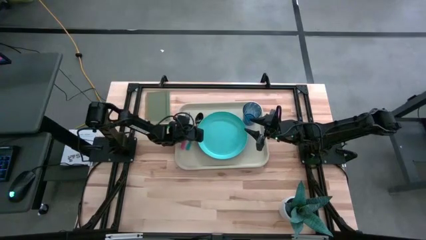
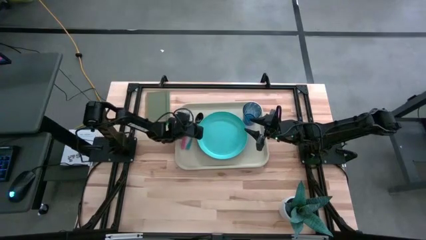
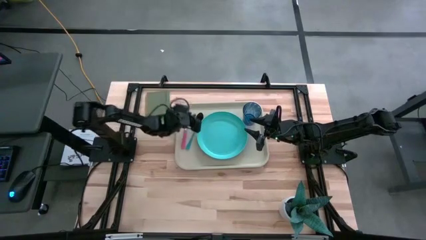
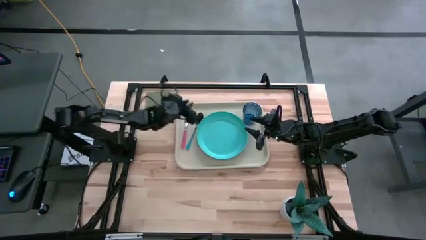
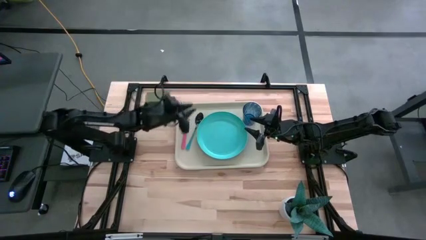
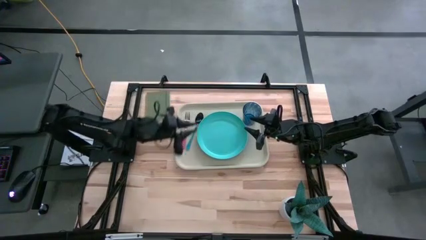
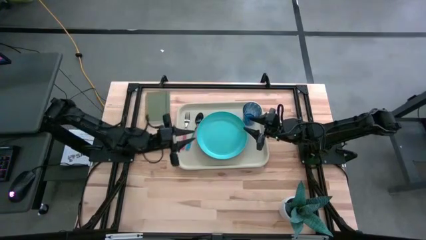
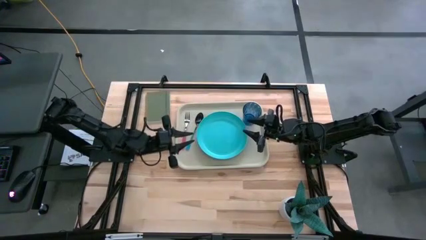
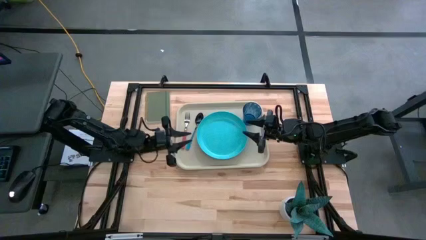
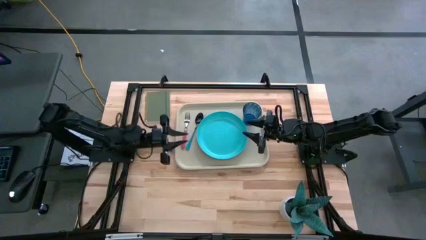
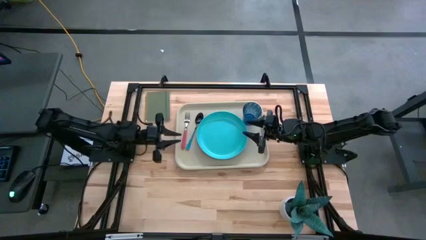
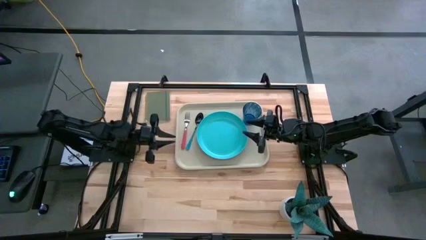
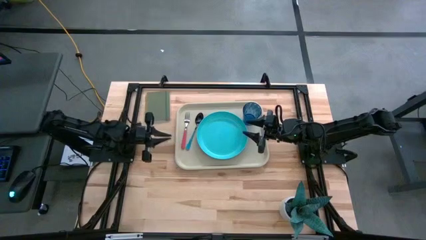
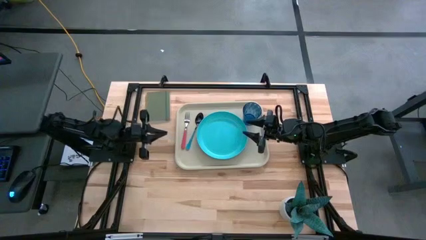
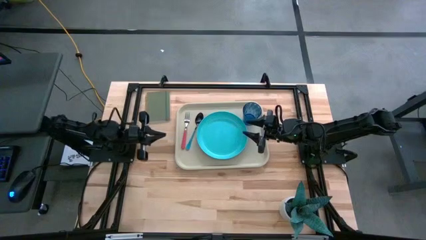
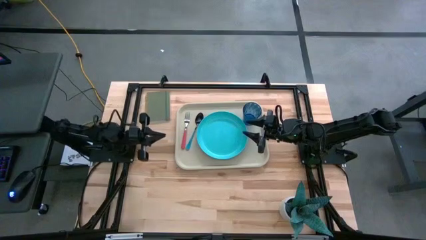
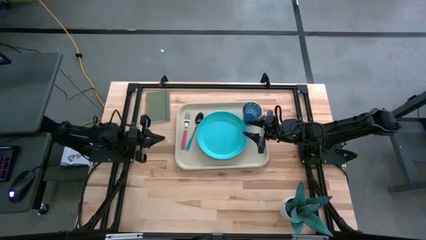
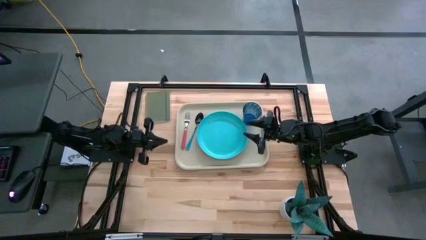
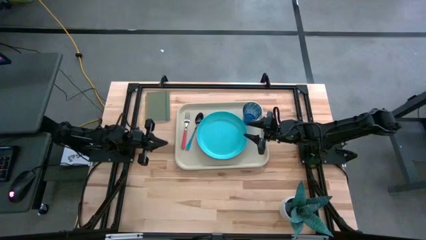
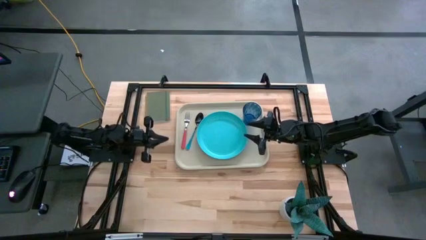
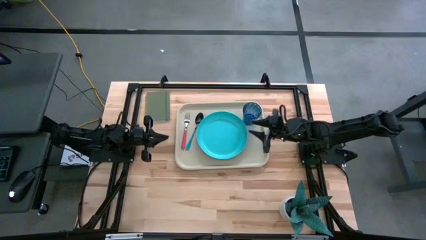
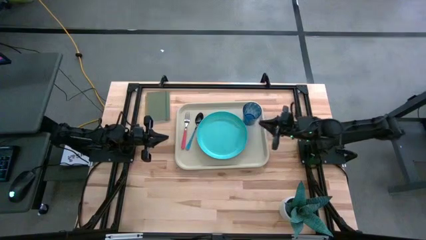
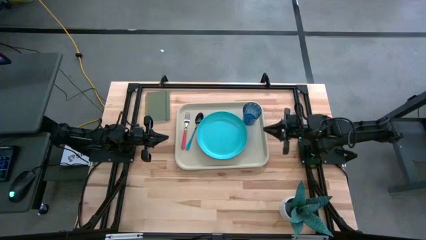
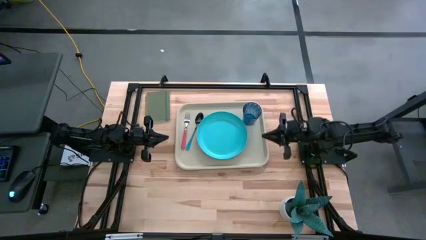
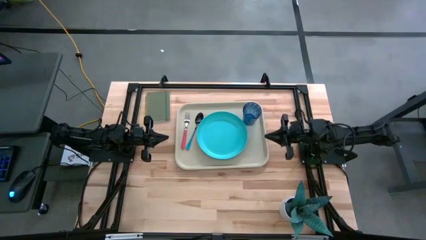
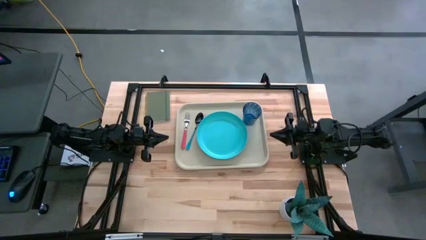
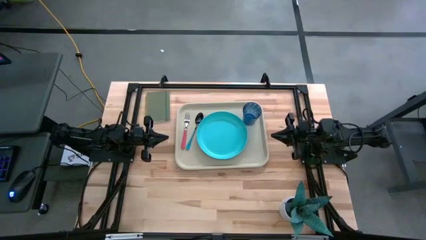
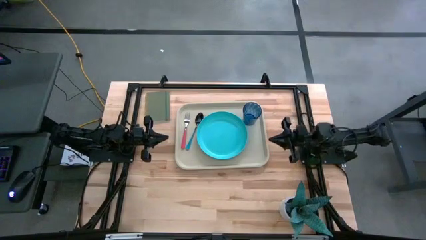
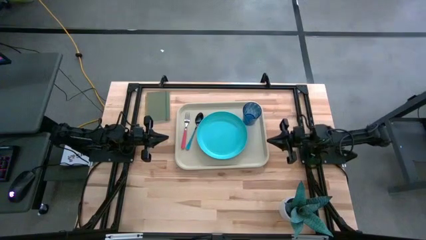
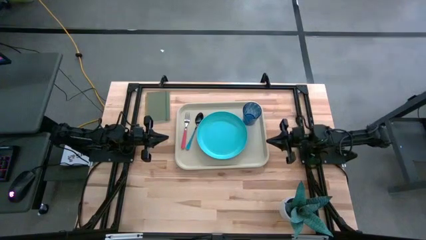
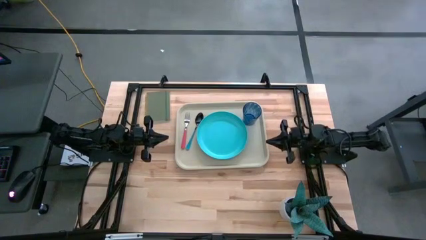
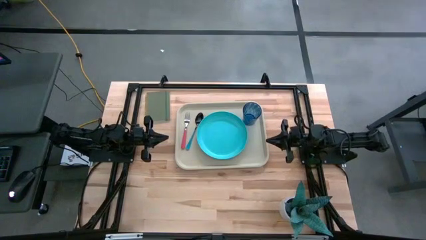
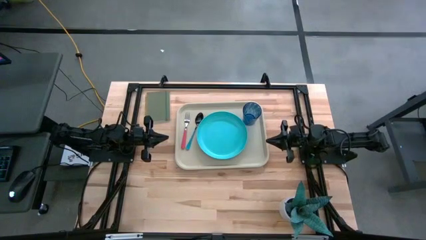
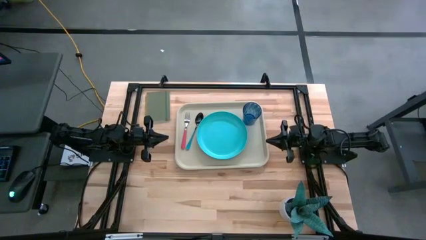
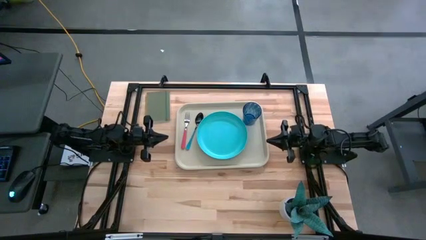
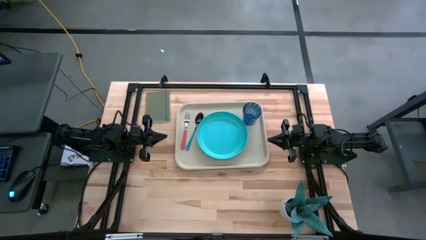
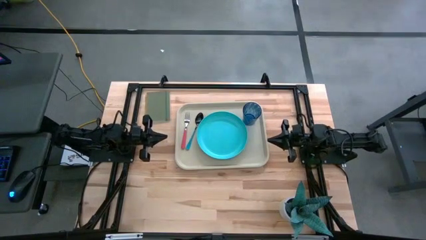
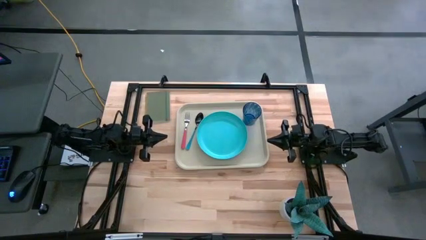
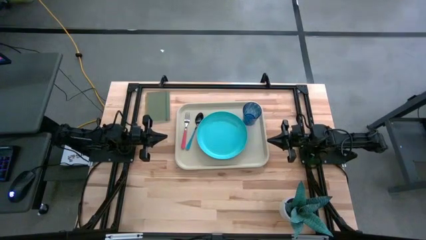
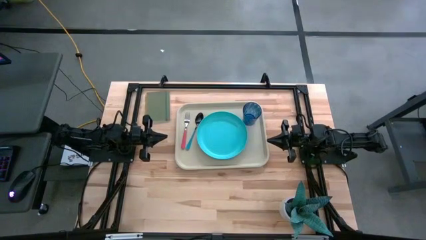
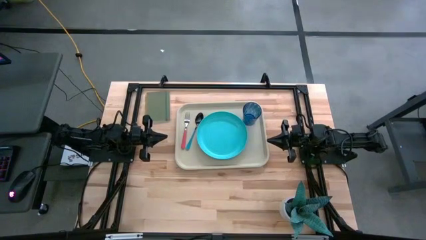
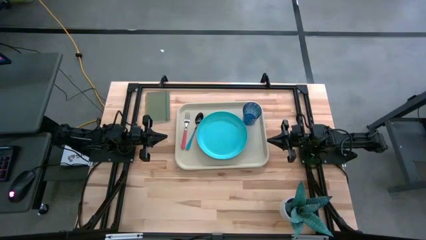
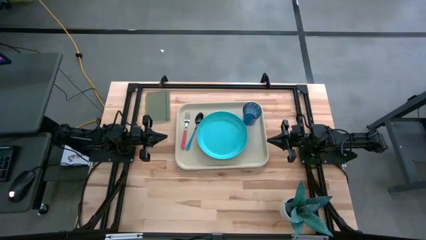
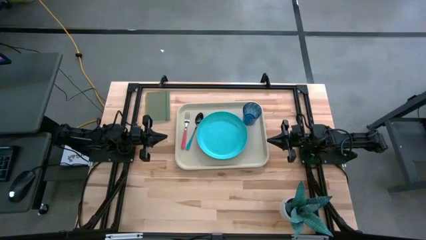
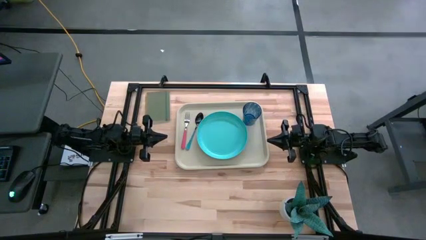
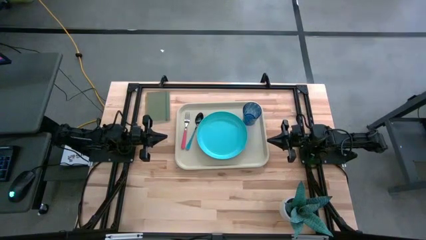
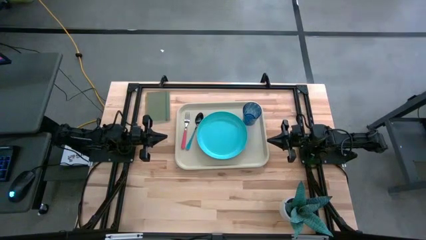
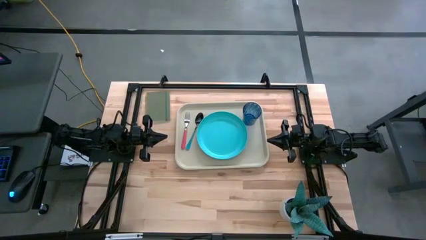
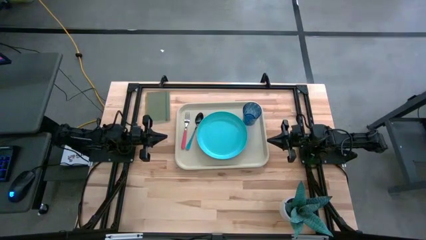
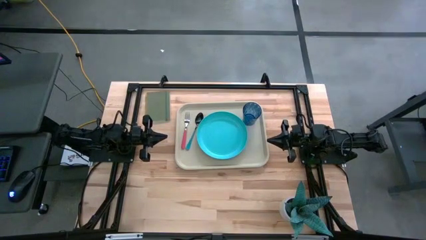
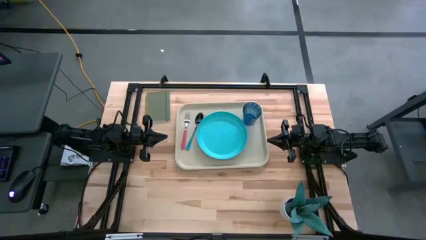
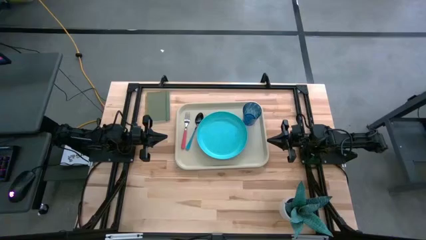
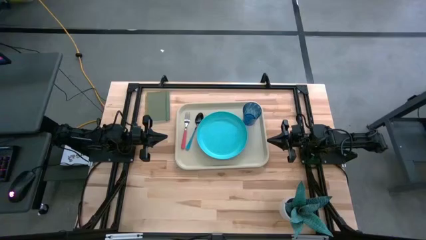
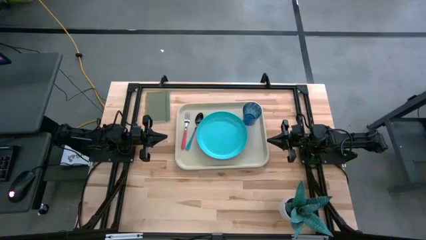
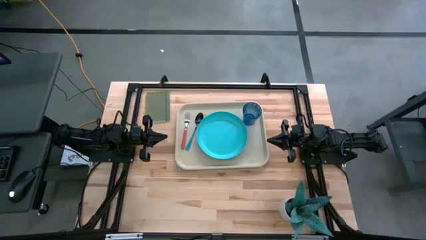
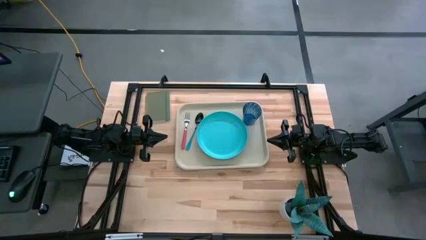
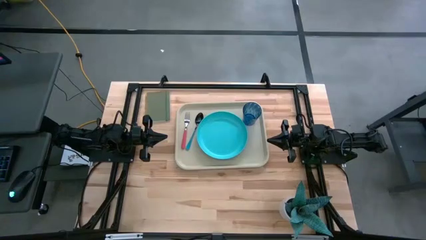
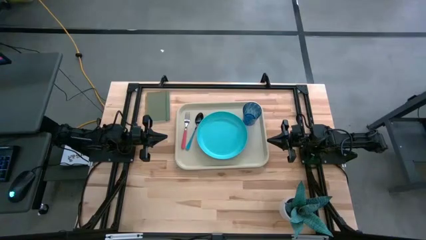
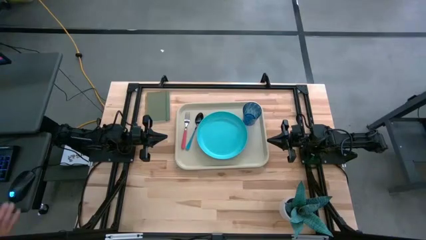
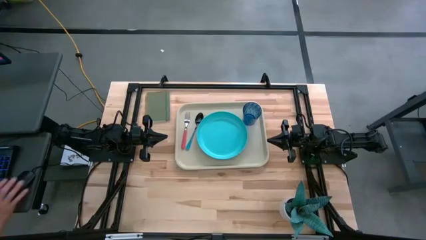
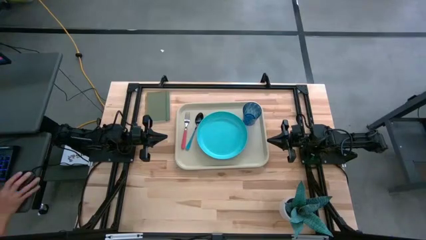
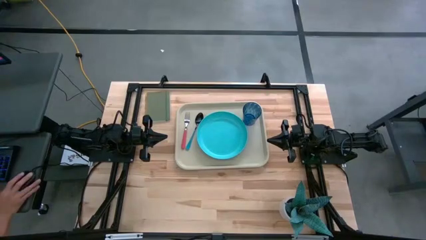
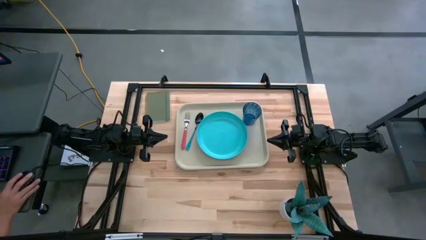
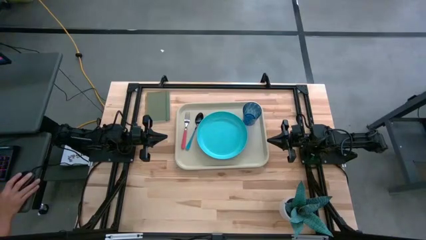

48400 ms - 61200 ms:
Task: Pick and place plate/cup/fork/spoon on tray
Return to Home Position
